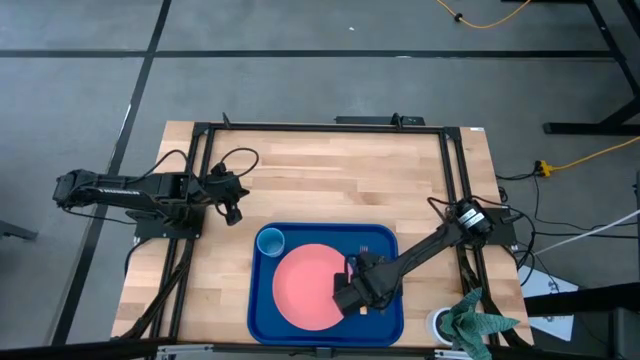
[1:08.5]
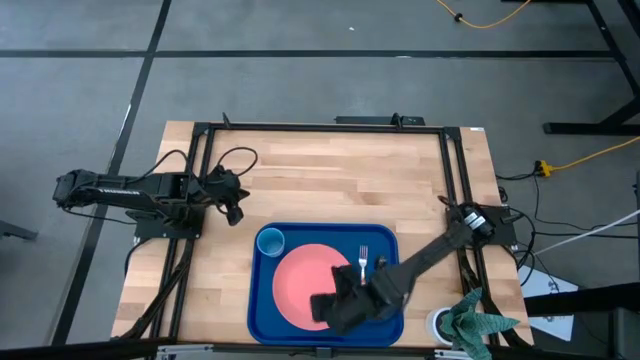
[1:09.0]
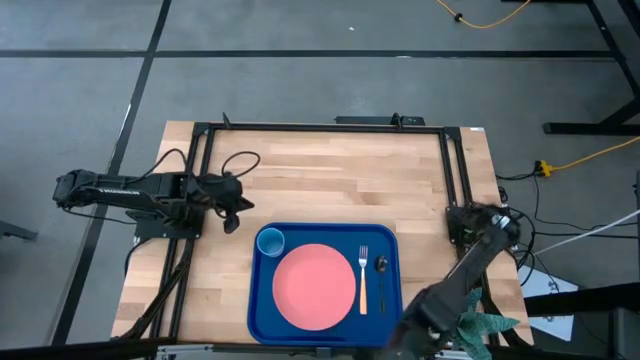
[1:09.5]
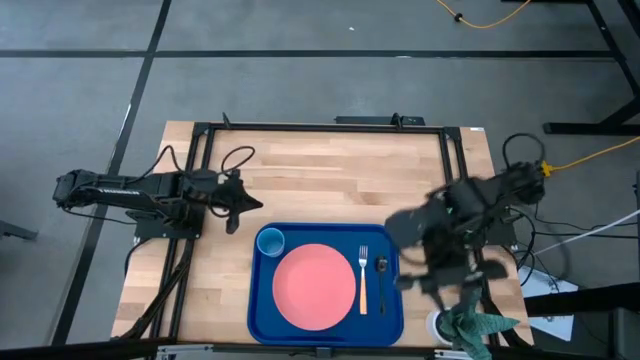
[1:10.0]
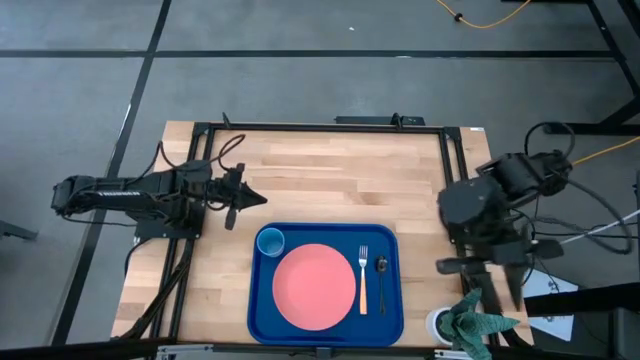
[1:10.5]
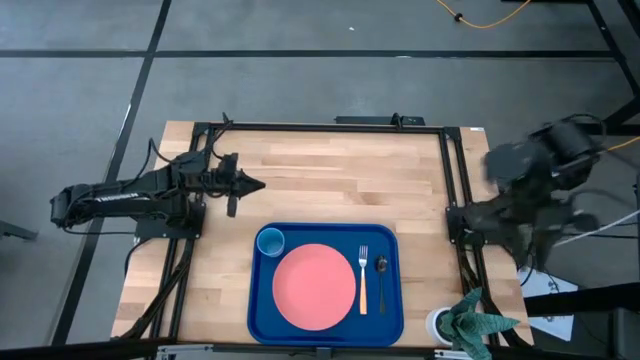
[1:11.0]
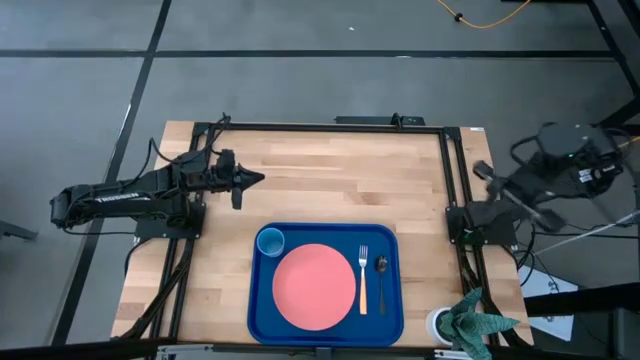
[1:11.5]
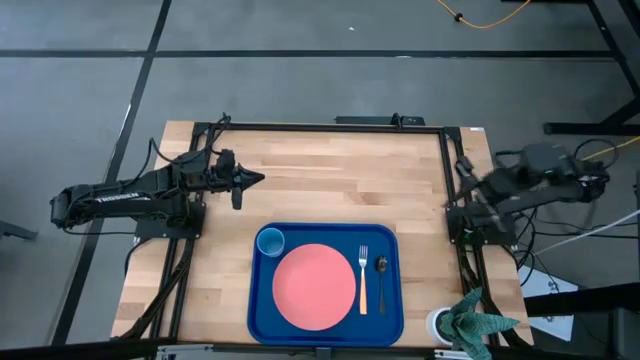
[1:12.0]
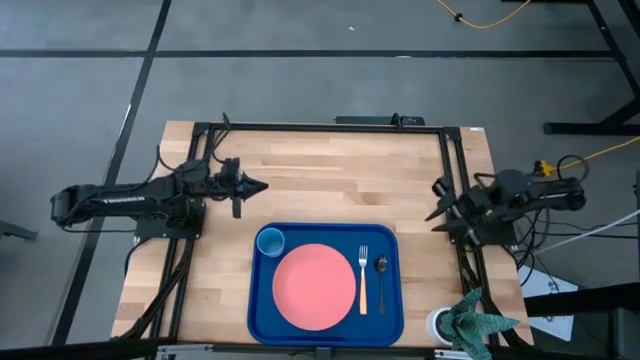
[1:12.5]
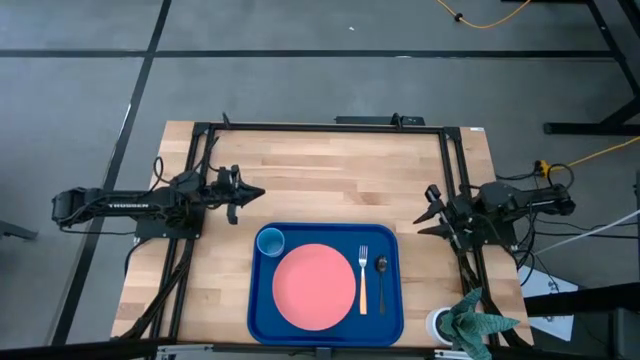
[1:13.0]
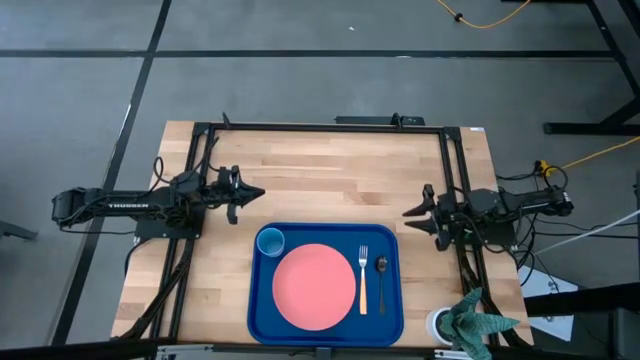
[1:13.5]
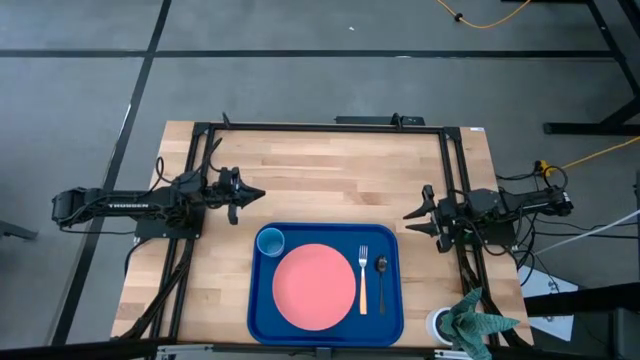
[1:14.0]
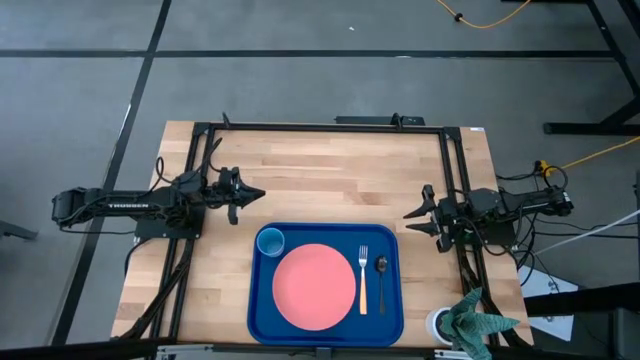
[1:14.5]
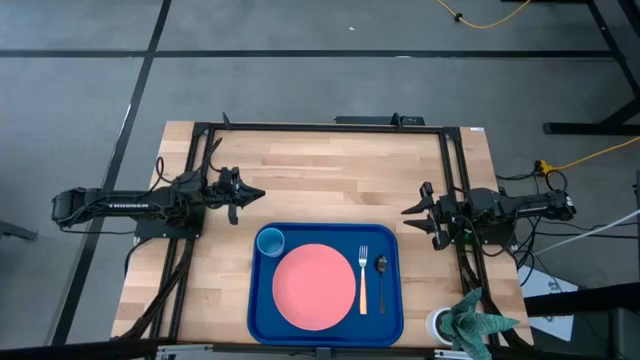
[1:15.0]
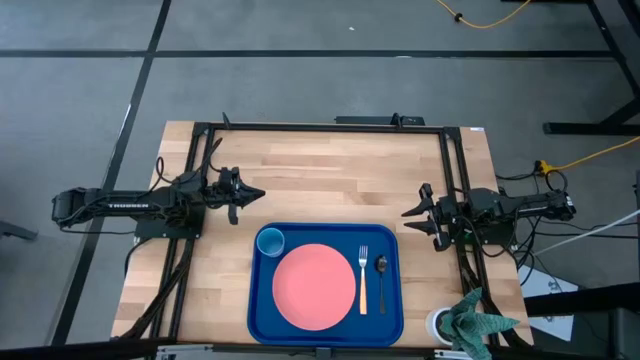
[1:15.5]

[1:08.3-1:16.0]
Task: Pick and place plate/cup/fork/spoon on tray
Return to Home Position

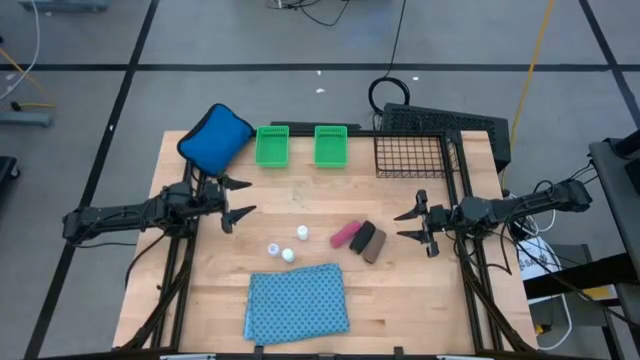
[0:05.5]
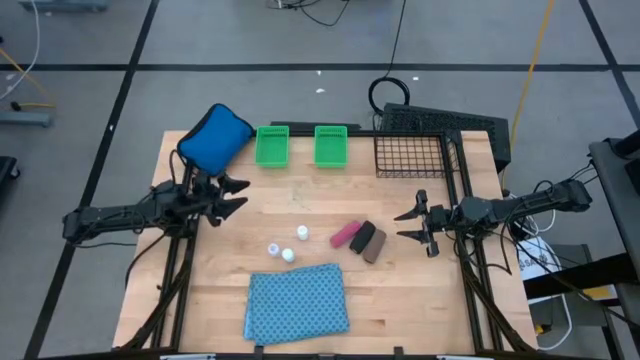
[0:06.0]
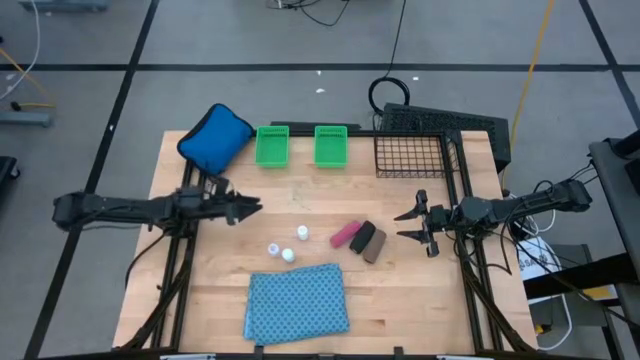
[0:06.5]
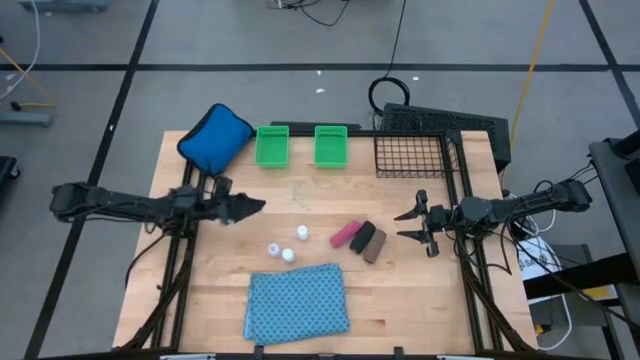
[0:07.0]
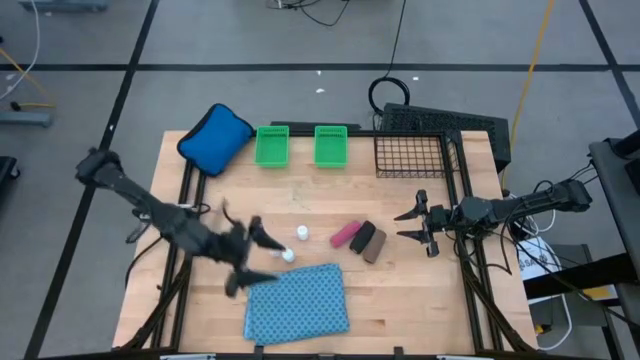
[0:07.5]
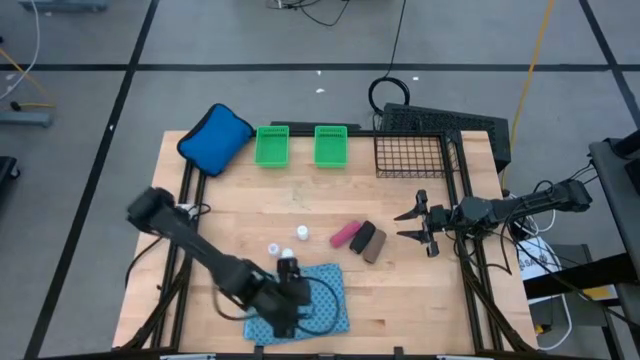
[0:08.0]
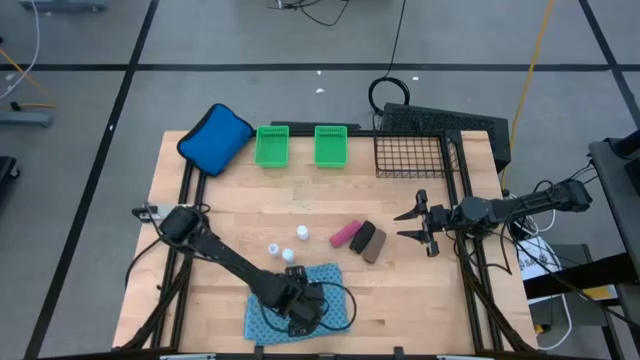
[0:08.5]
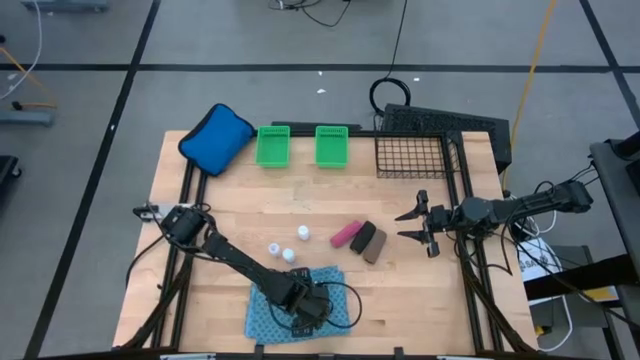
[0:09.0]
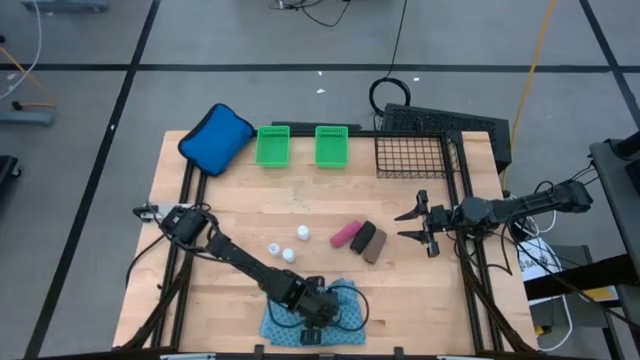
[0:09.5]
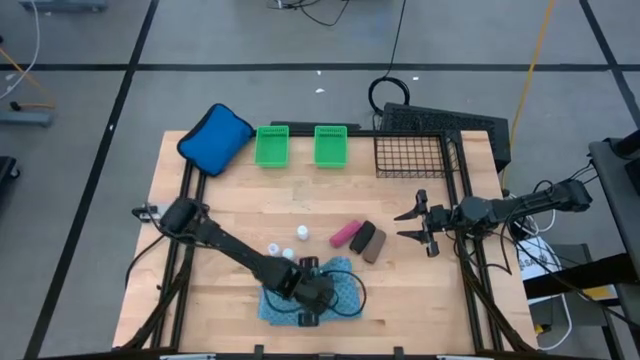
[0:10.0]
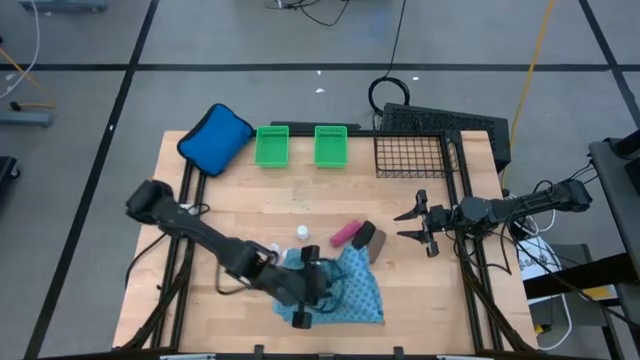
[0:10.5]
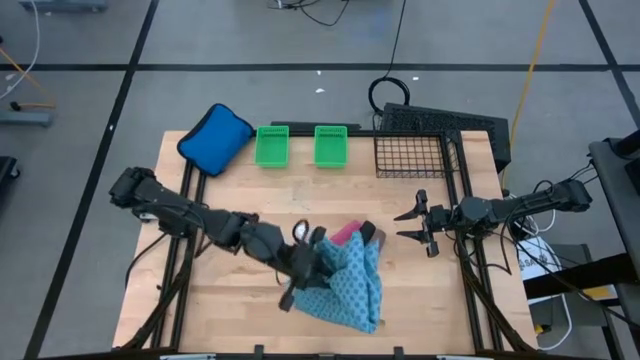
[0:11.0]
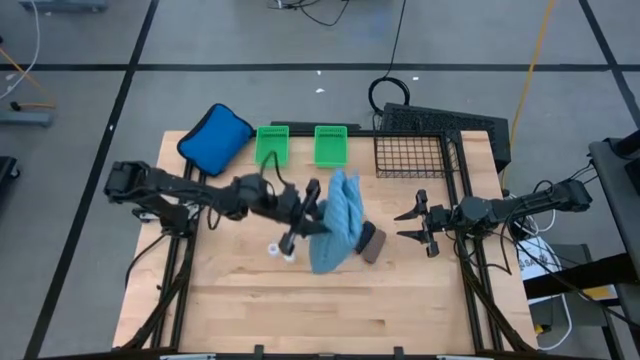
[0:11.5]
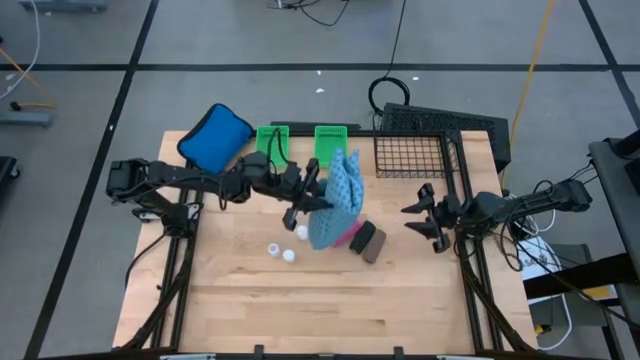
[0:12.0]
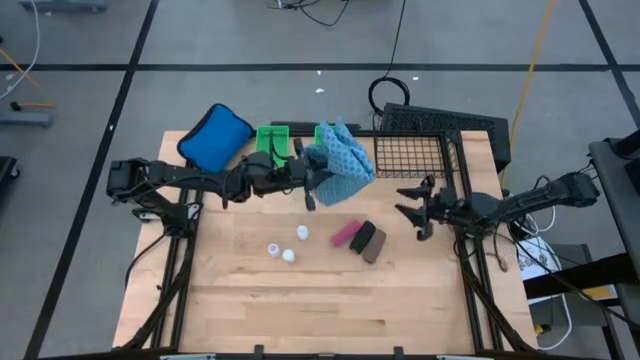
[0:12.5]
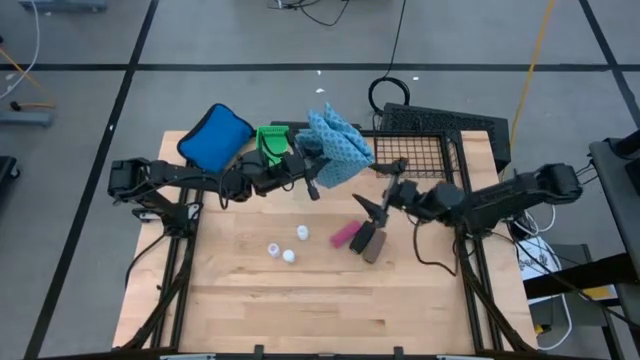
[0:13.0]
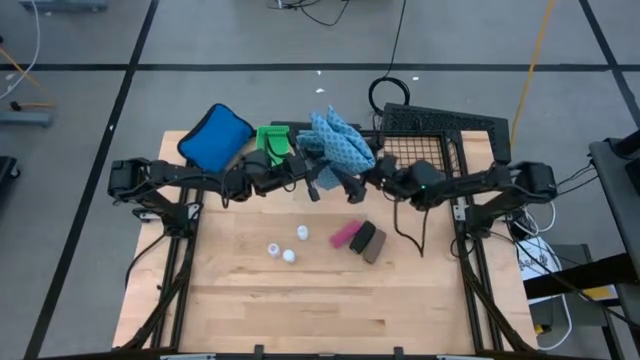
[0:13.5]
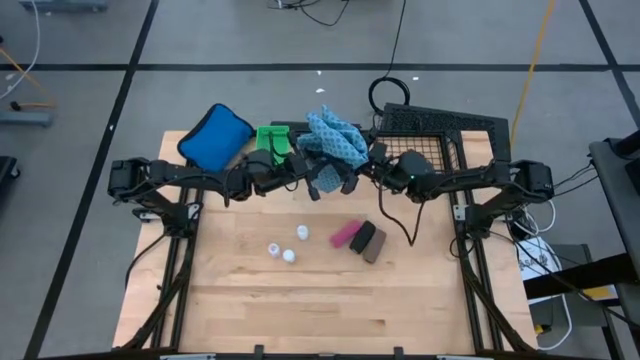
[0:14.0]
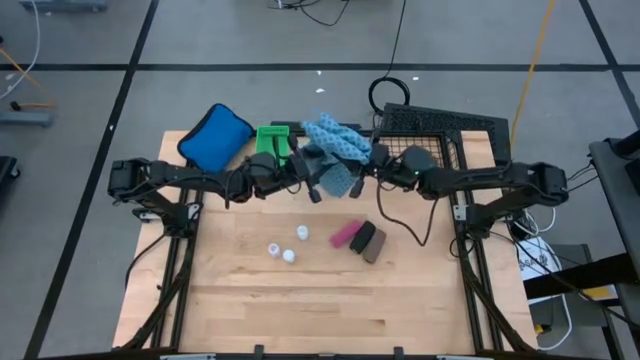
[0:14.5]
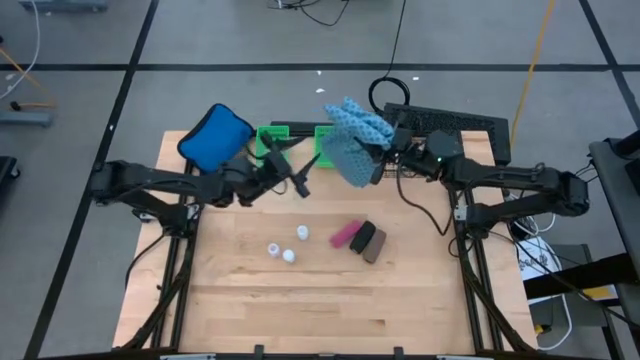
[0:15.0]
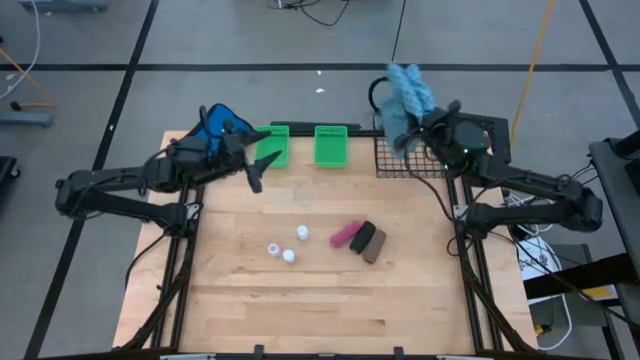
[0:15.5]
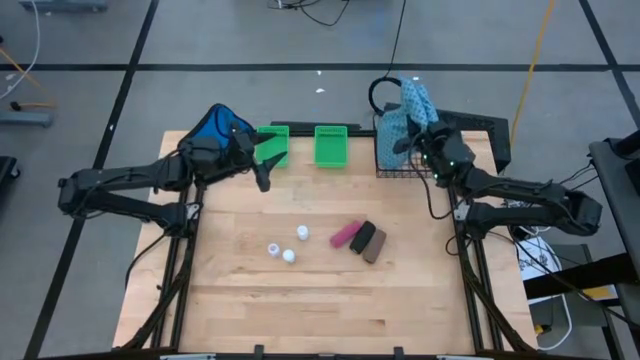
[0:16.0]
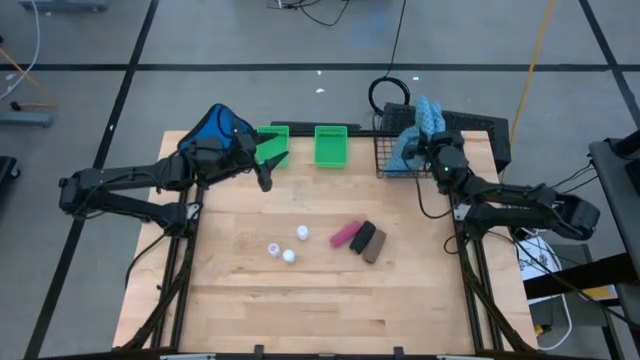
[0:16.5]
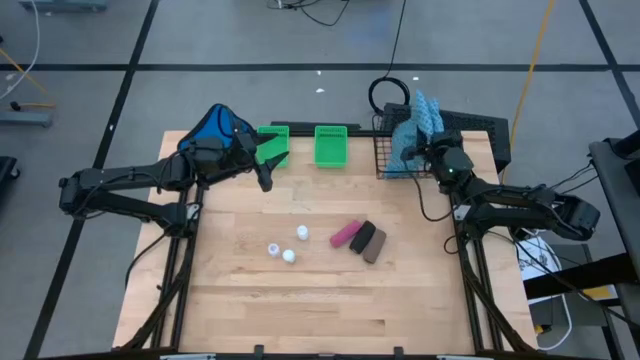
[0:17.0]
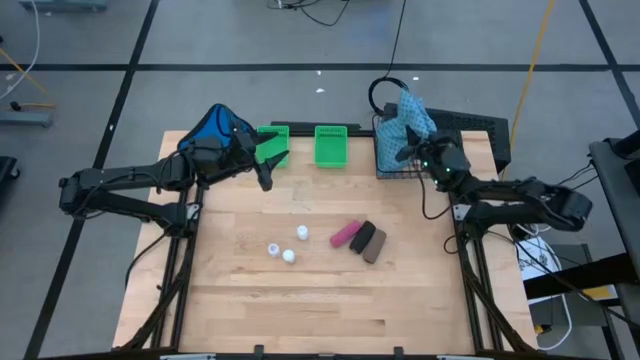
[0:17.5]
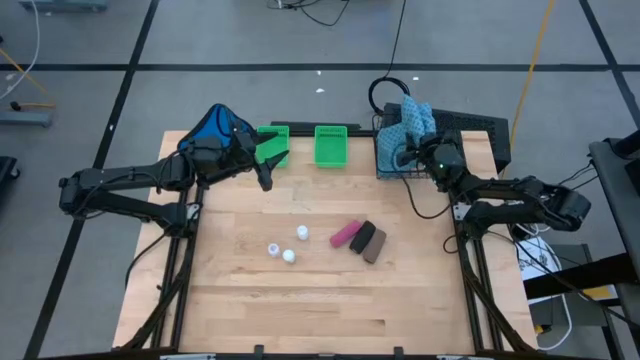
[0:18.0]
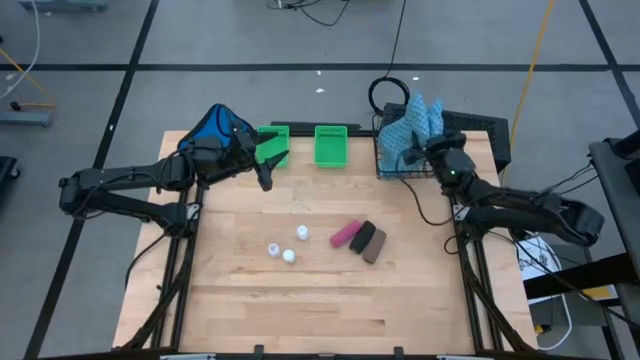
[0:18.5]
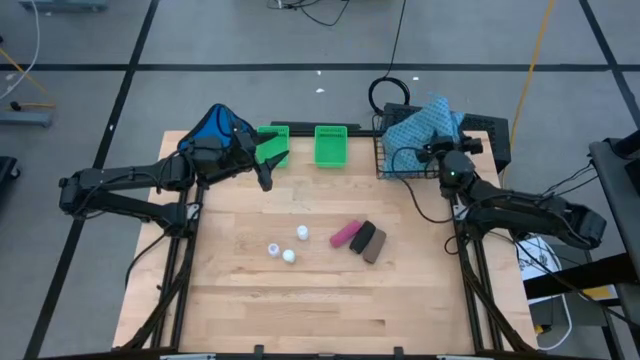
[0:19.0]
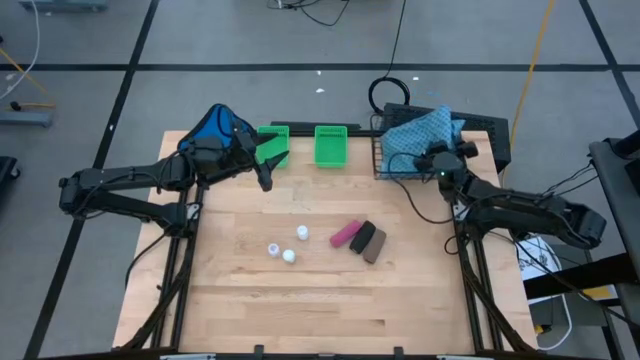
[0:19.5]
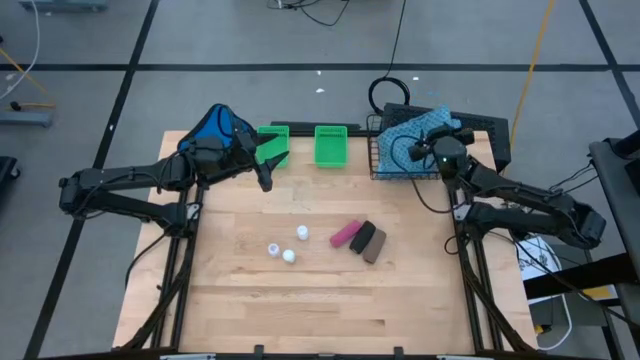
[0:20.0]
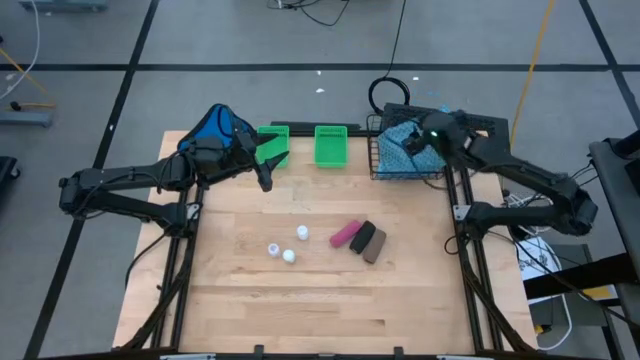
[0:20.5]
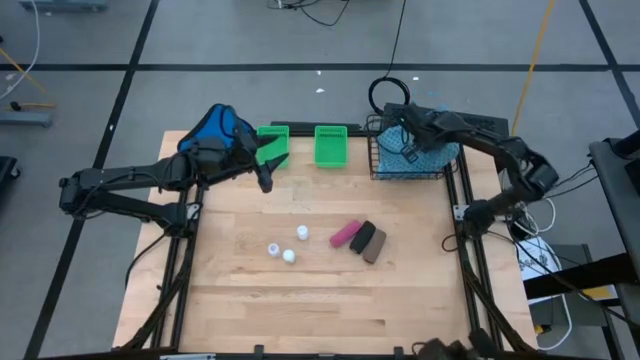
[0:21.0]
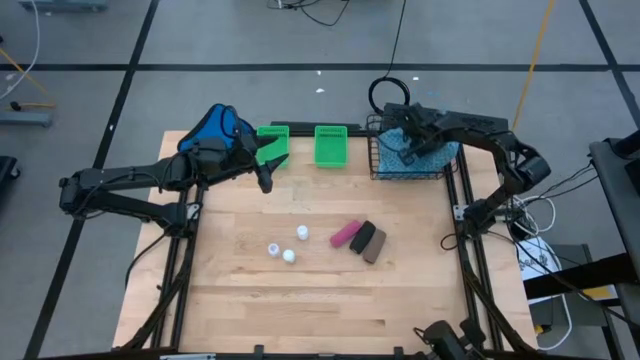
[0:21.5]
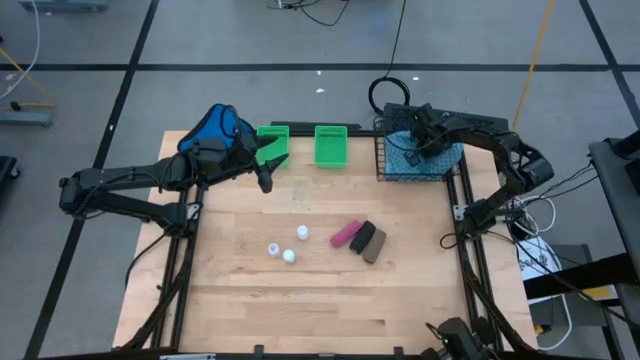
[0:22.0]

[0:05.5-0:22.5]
Task: Pick & place medical supplies in basket/bin
Put the patient gown into the mesh basket
